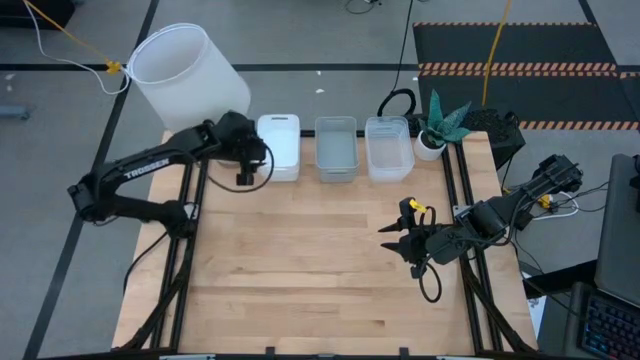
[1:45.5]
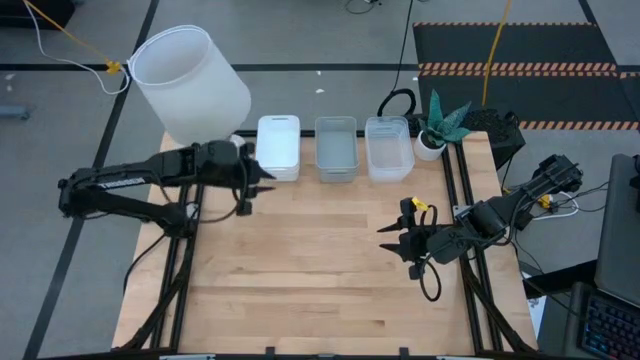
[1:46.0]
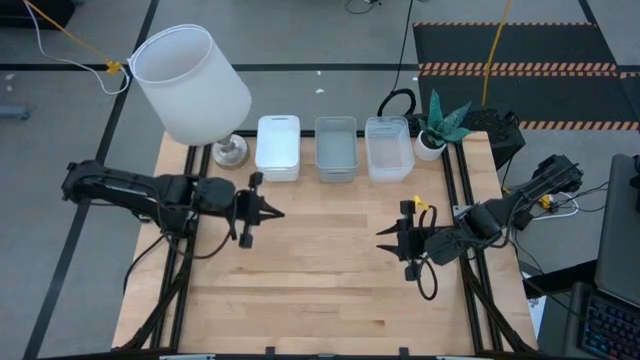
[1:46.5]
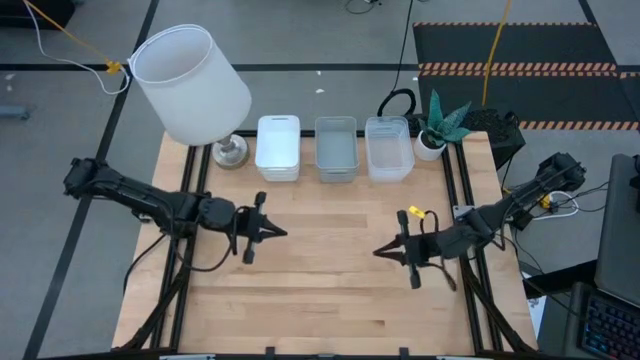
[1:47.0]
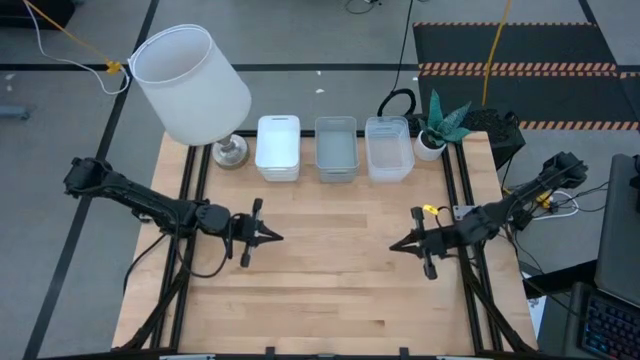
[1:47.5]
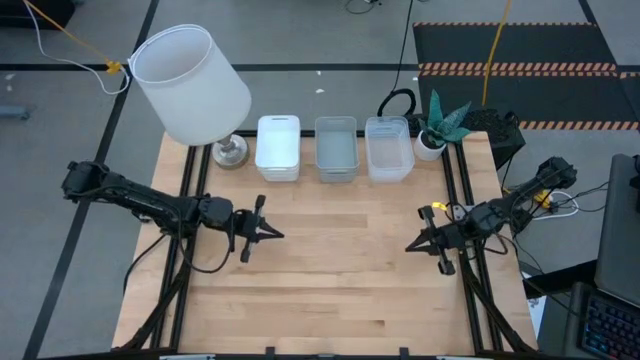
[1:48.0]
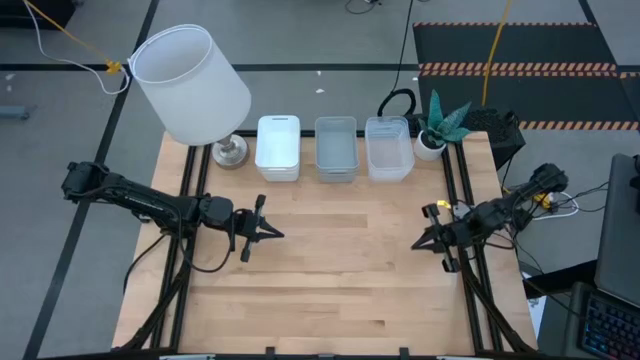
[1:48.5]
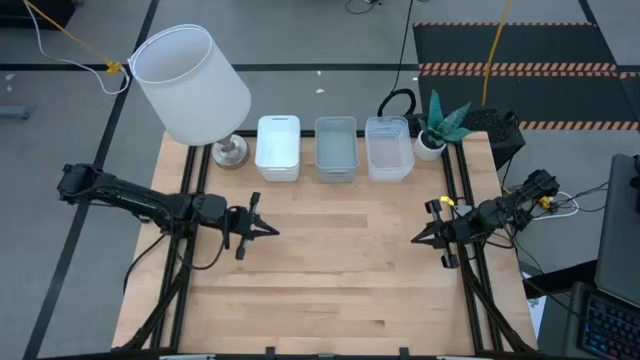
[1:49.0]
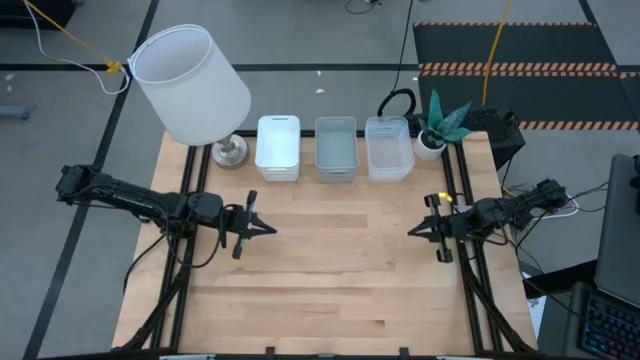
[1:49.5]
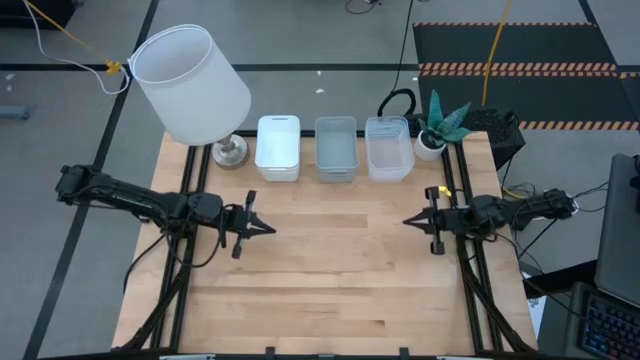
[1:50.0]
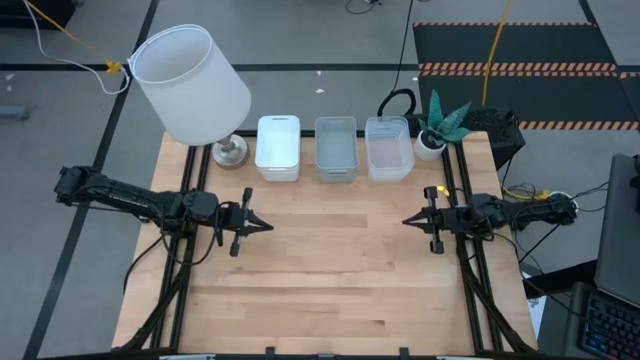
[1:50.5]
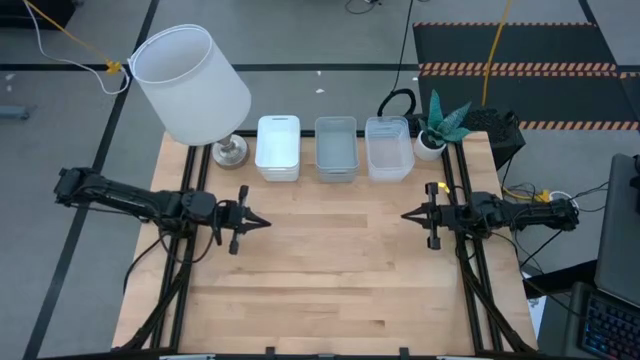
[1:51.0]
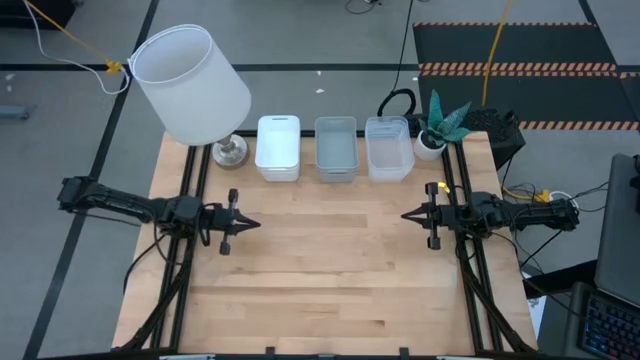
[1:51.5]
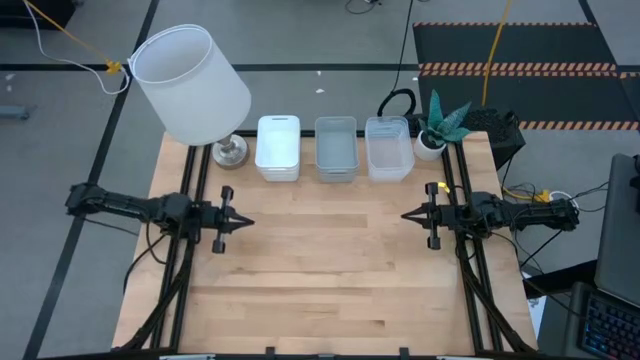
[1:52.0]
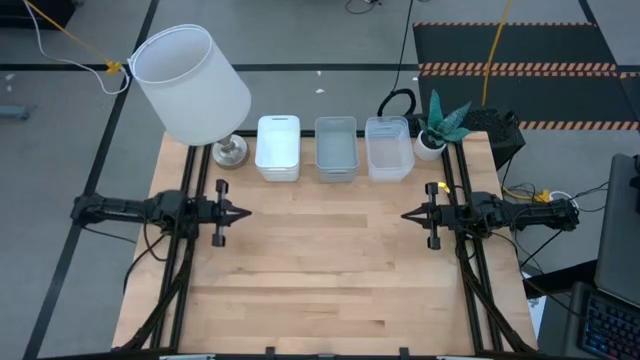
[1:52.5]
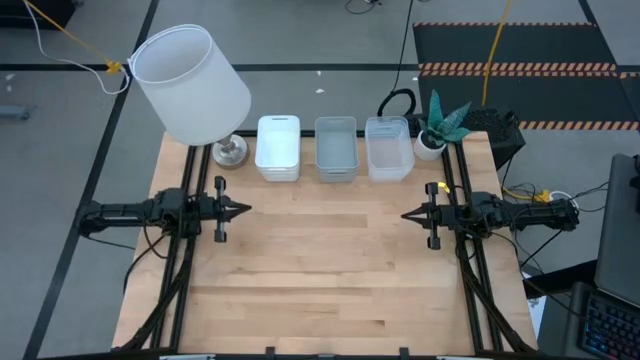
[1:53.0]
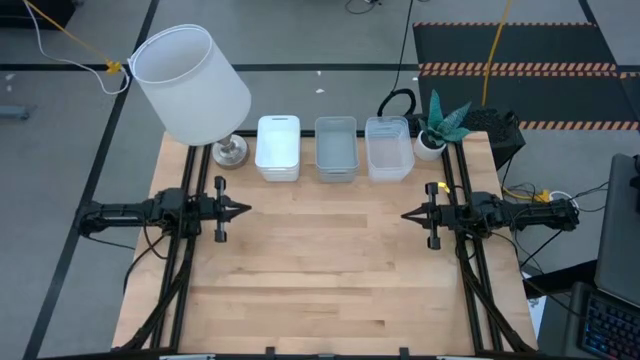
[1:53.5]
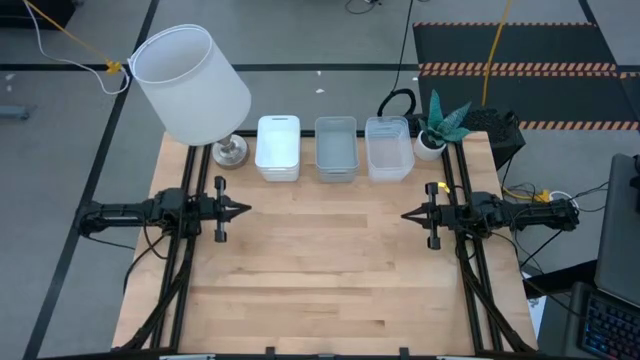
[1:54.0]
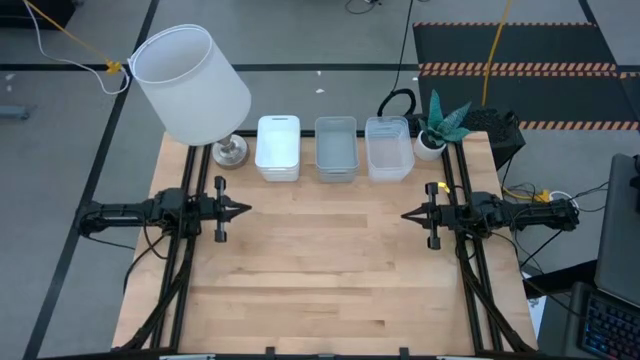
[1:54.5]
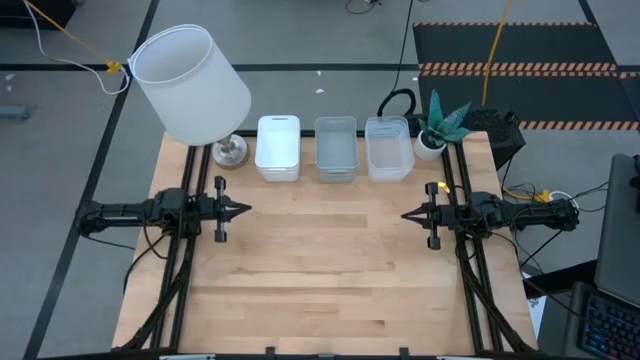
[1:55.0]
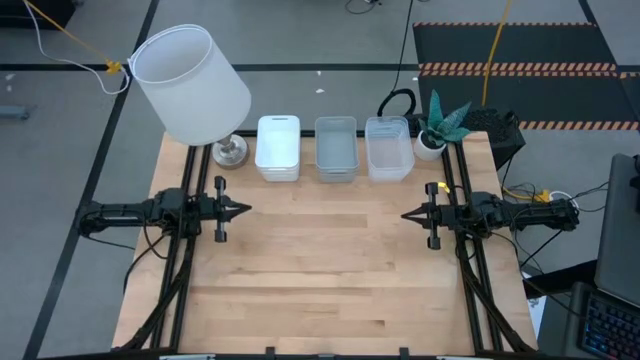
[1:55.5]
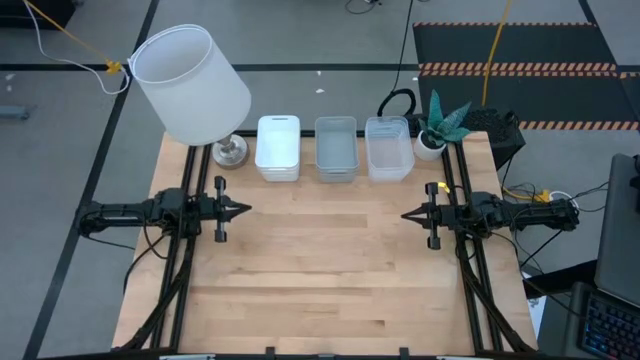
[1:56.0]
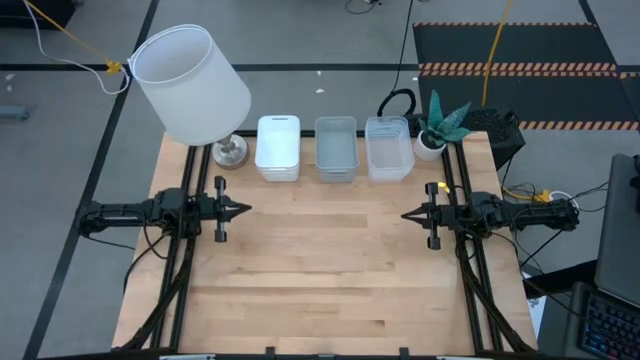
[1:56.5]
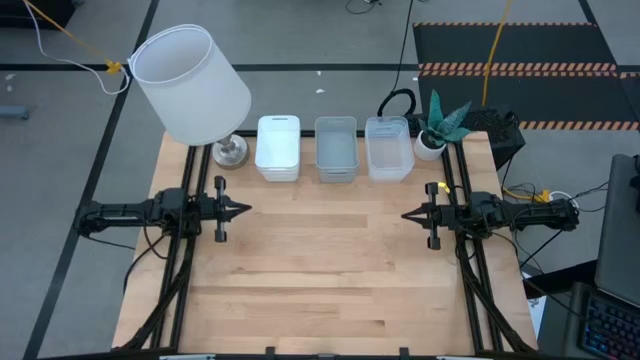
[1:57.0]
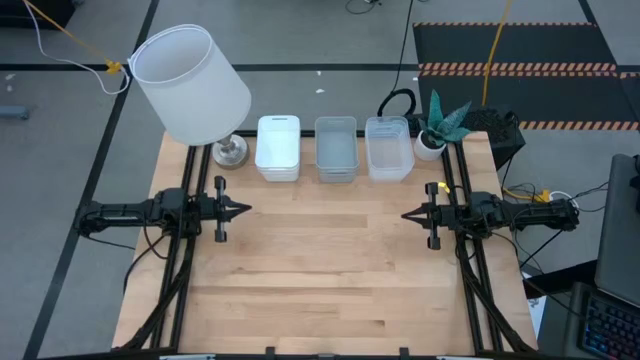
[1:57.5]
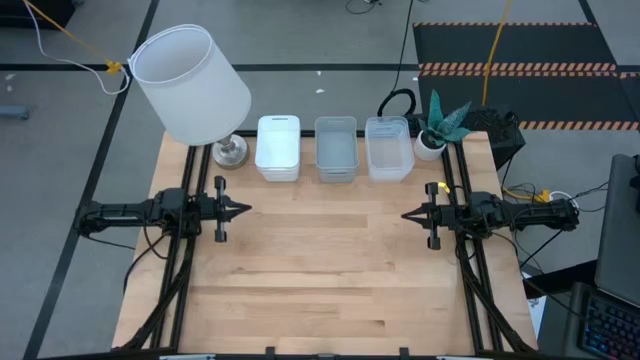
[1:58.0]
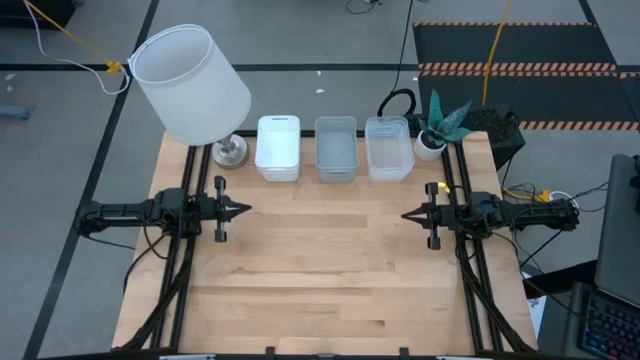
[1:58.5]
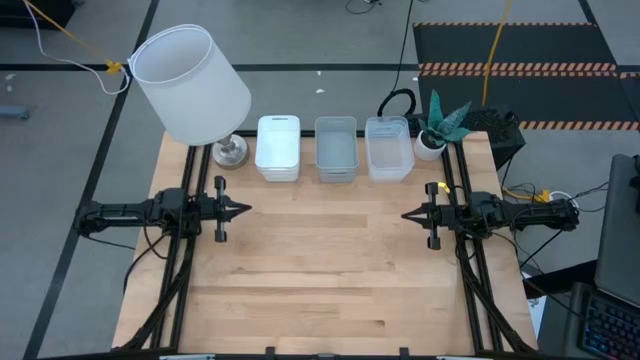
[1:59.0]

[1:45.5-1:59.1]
Return to Home Position

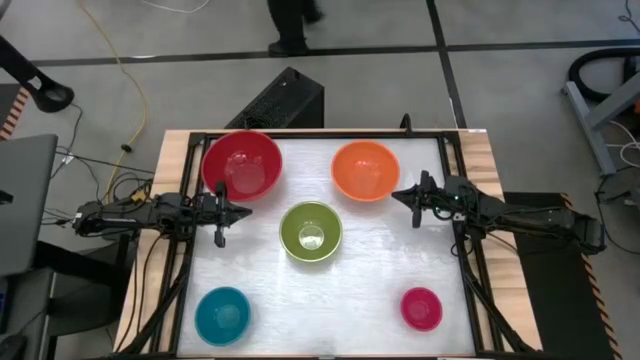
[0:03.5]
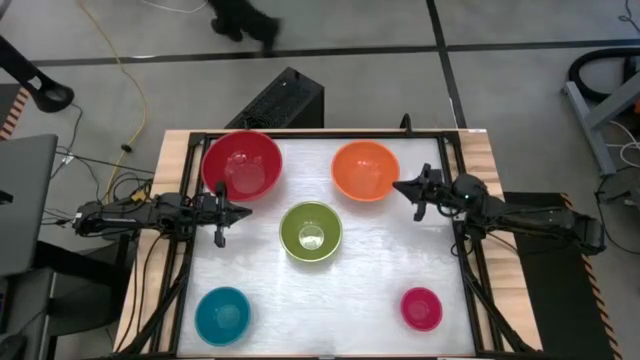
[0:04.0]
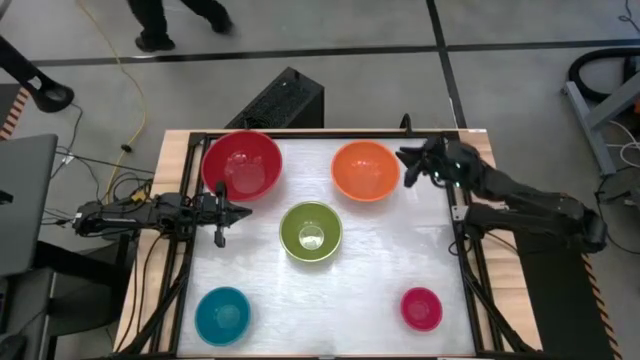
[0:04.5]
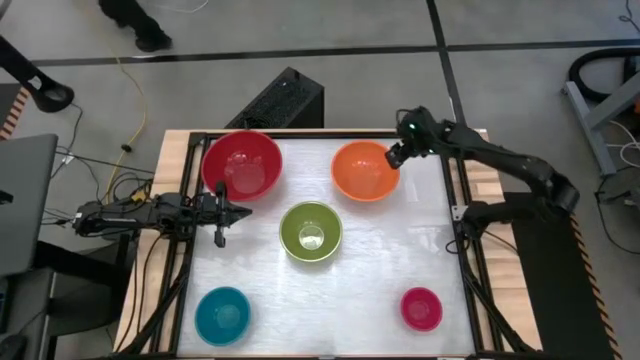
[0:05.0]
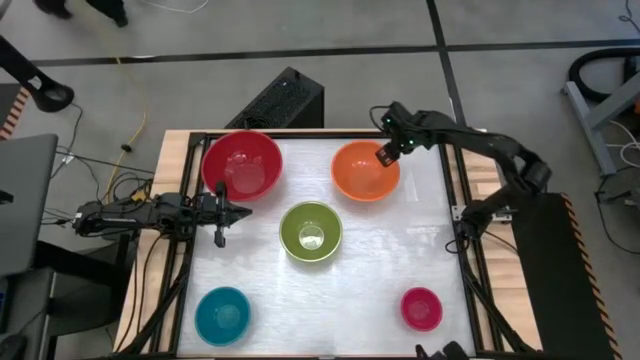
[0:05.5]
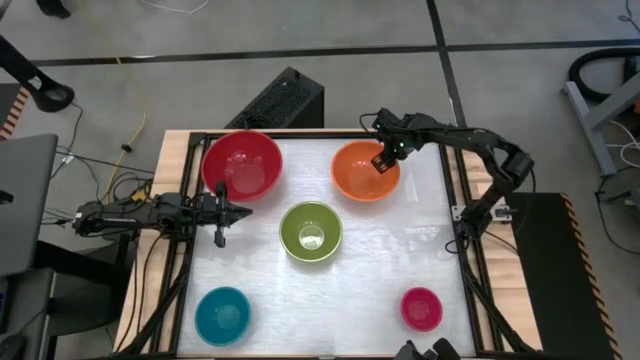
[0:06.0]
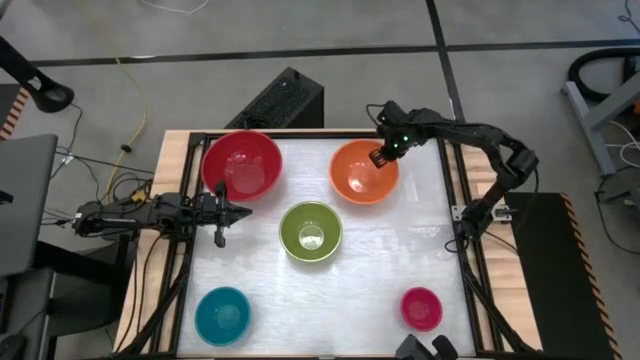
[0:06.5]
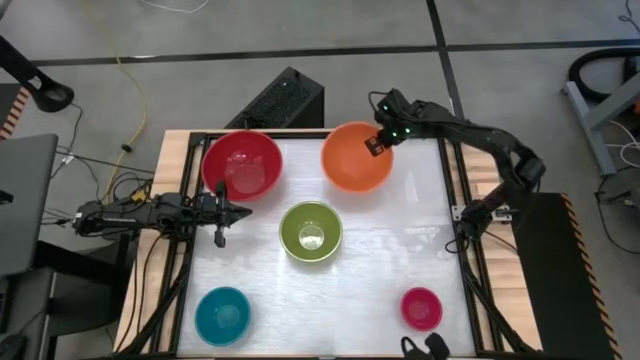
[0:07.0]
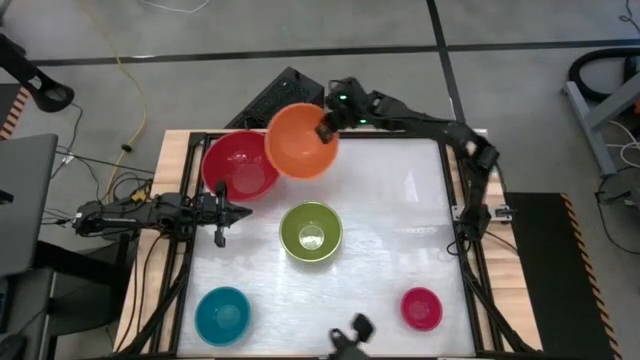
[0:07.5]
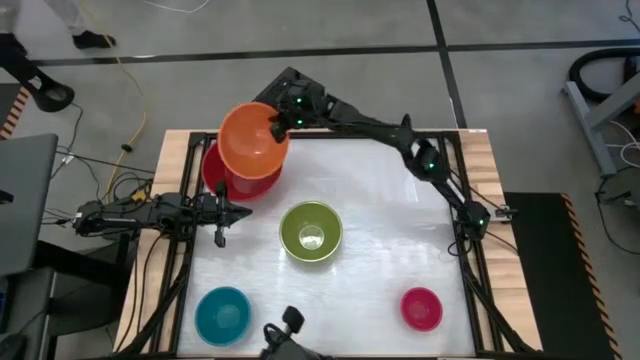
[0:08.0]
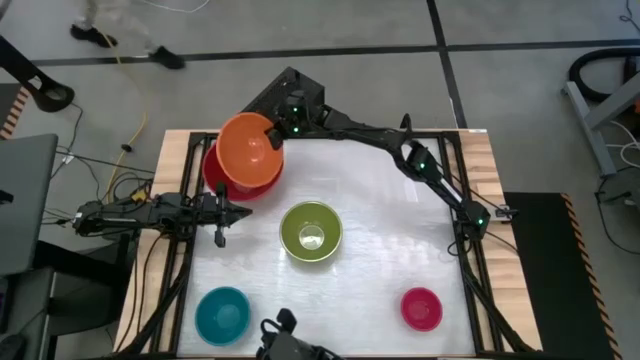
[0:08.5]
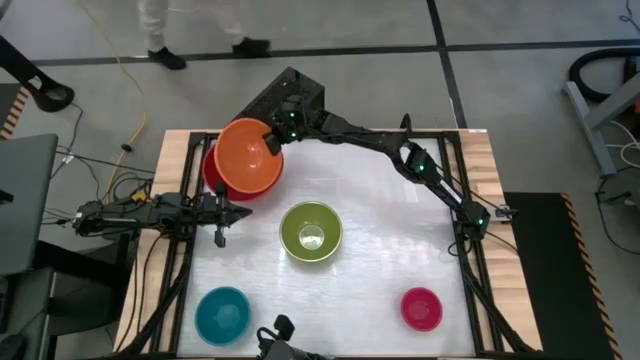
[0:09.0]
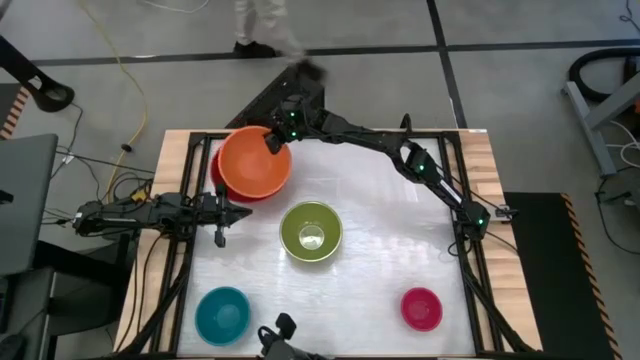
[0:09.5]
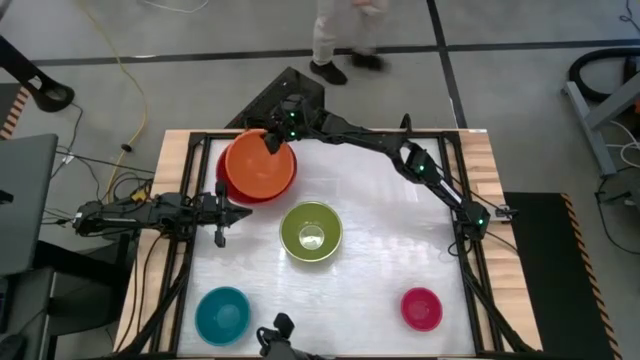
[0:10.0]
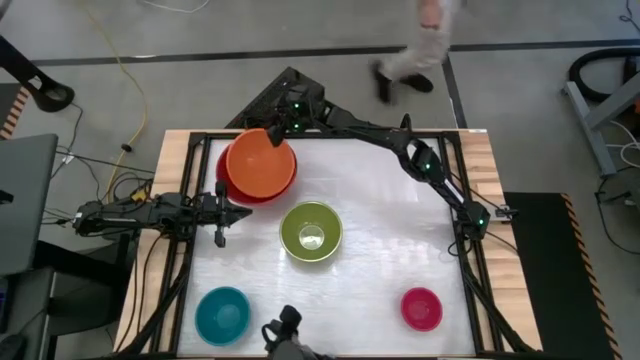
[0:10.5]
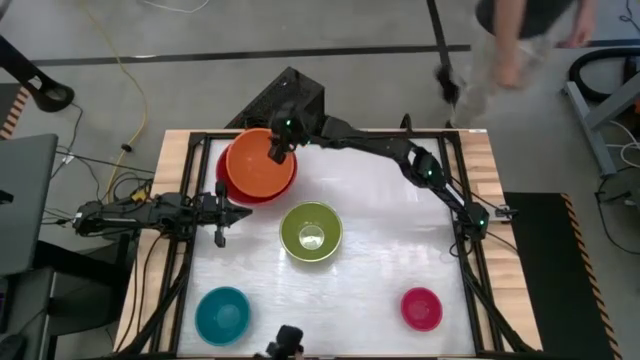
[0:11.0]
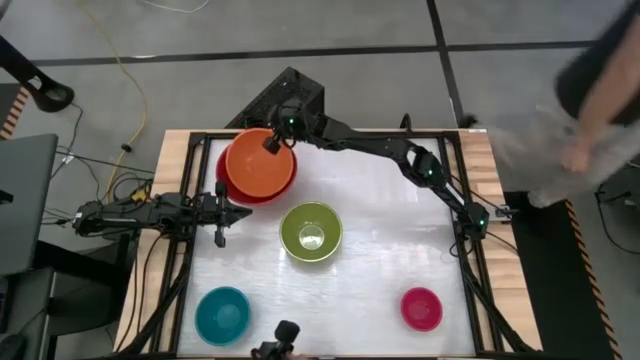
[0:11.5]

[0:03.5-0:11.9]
Stack the orange bowl on top of the red bowl
